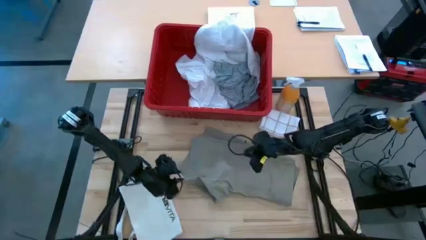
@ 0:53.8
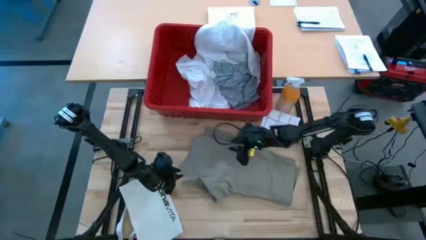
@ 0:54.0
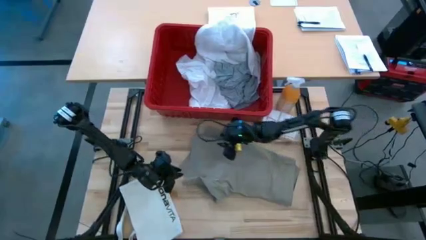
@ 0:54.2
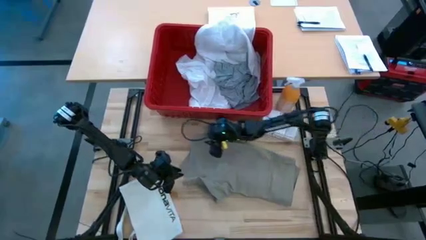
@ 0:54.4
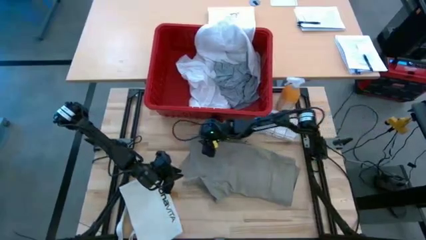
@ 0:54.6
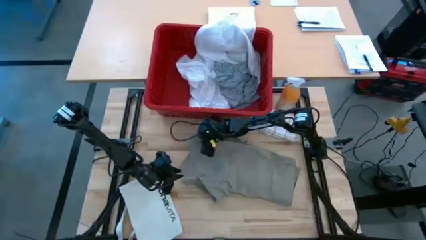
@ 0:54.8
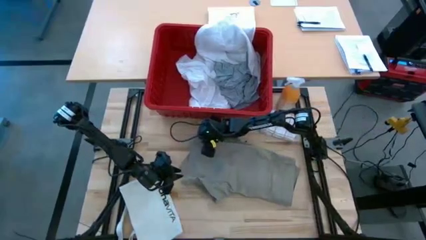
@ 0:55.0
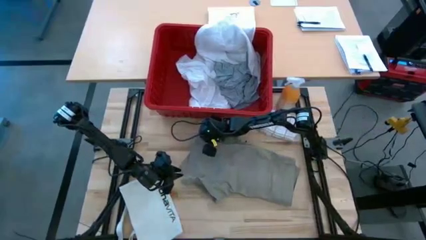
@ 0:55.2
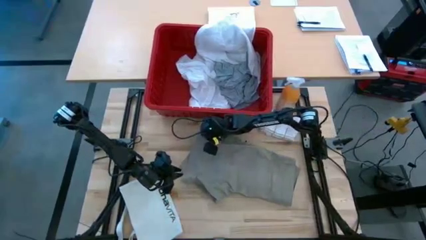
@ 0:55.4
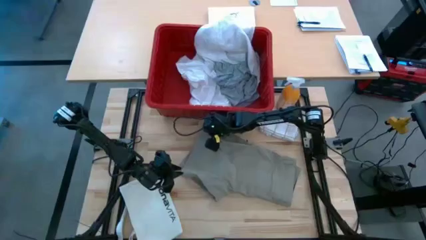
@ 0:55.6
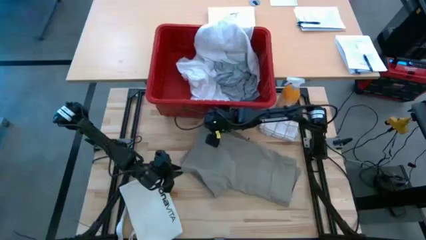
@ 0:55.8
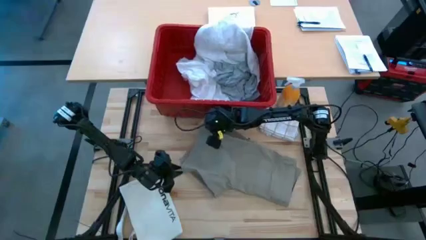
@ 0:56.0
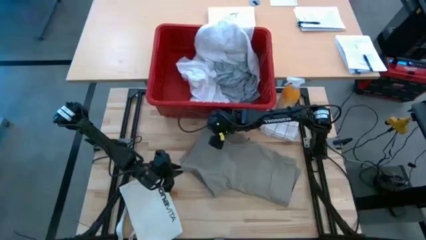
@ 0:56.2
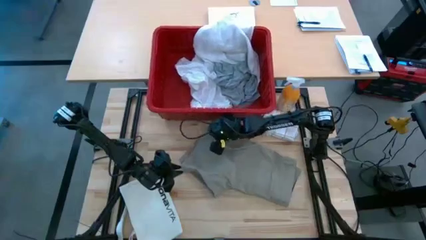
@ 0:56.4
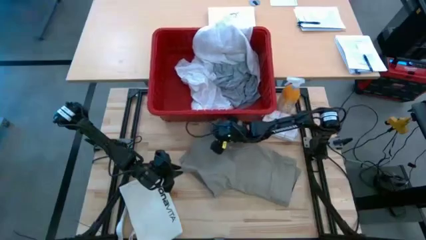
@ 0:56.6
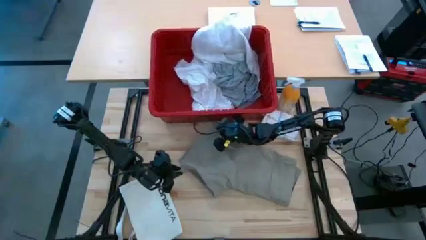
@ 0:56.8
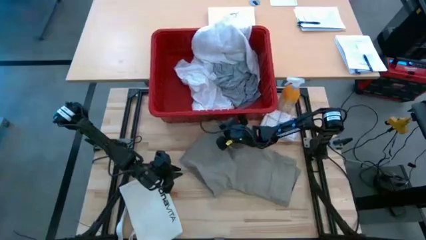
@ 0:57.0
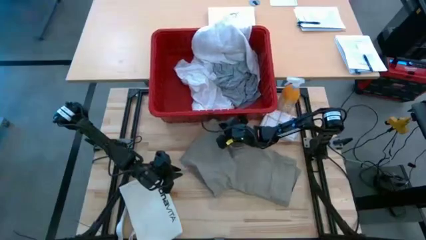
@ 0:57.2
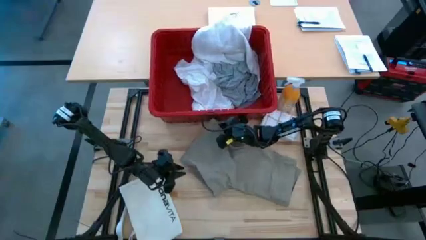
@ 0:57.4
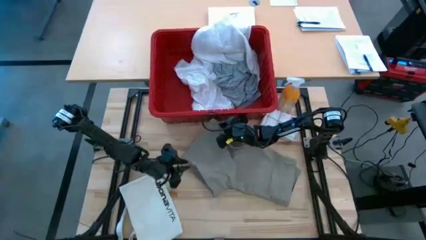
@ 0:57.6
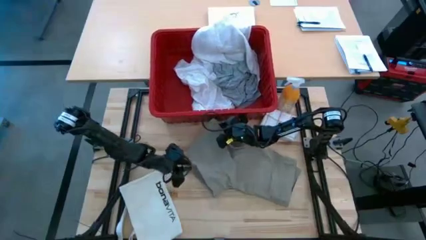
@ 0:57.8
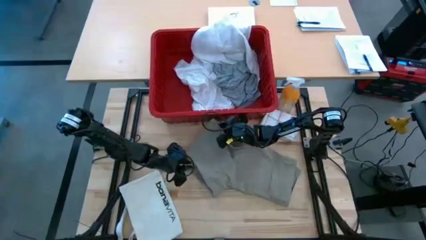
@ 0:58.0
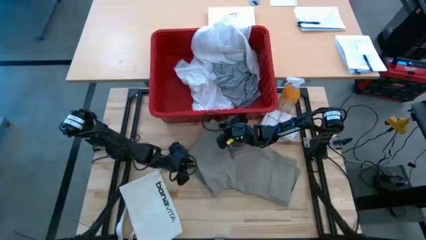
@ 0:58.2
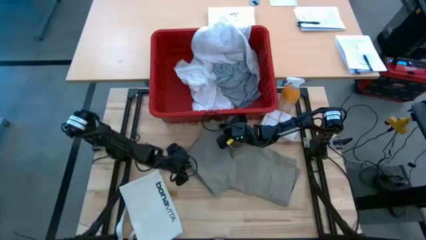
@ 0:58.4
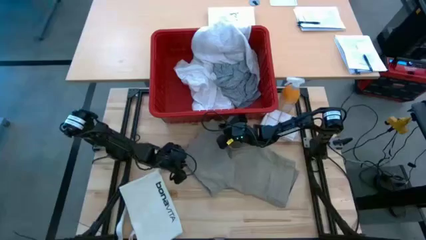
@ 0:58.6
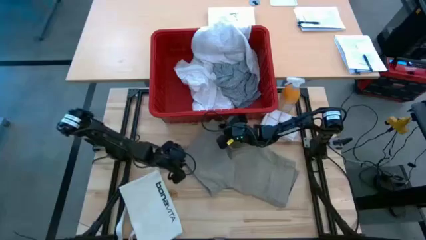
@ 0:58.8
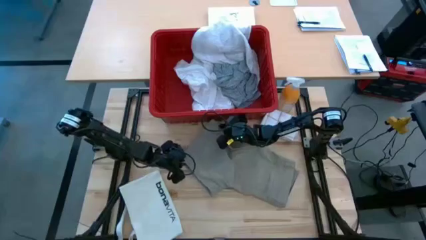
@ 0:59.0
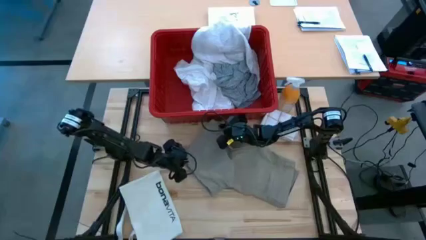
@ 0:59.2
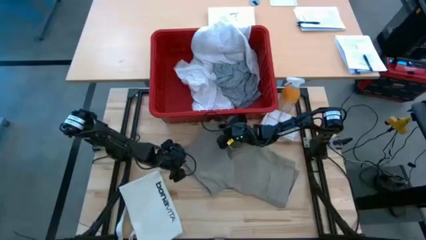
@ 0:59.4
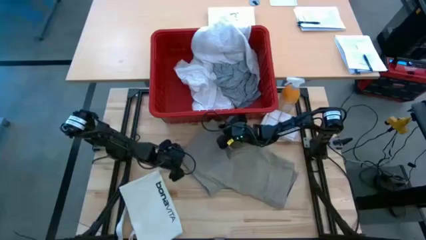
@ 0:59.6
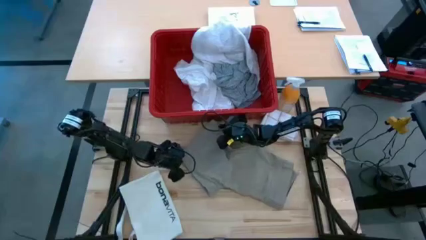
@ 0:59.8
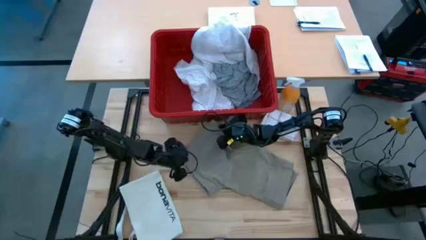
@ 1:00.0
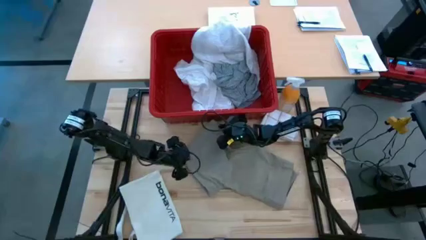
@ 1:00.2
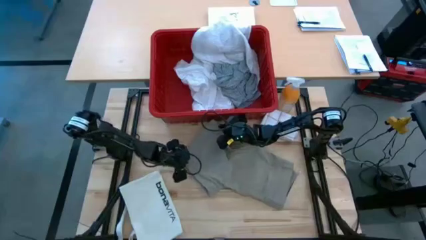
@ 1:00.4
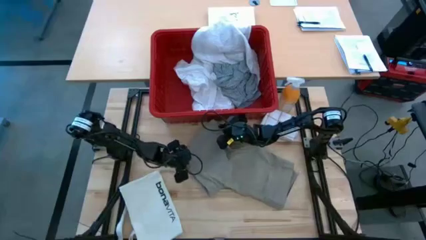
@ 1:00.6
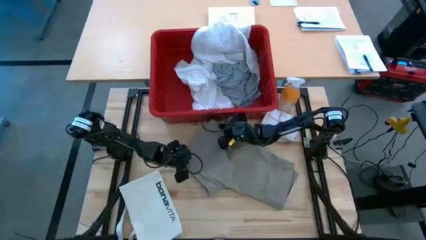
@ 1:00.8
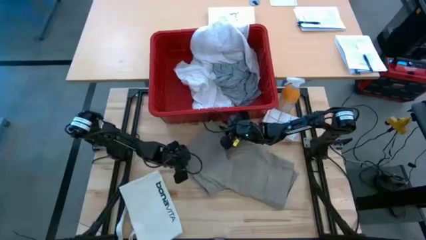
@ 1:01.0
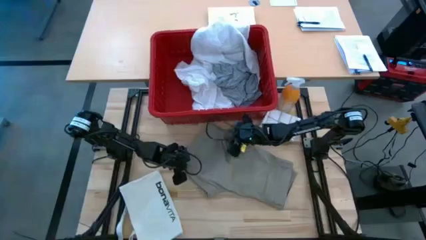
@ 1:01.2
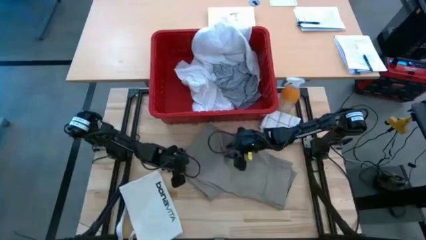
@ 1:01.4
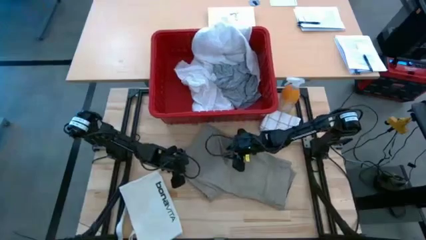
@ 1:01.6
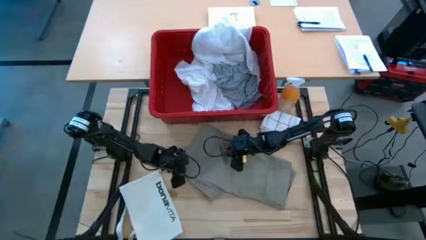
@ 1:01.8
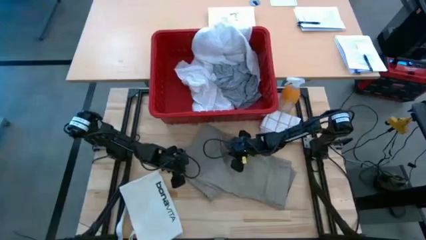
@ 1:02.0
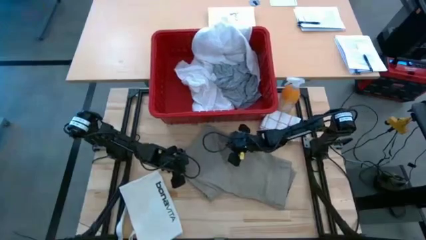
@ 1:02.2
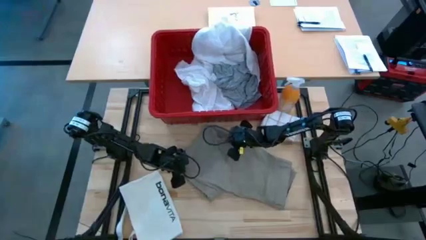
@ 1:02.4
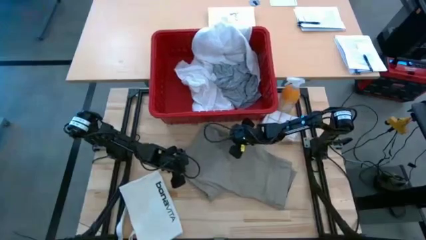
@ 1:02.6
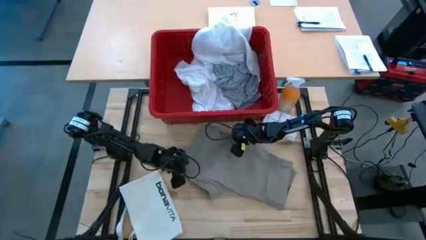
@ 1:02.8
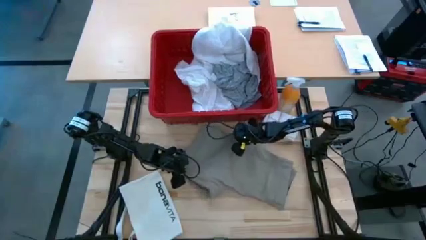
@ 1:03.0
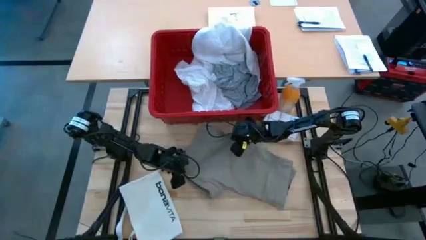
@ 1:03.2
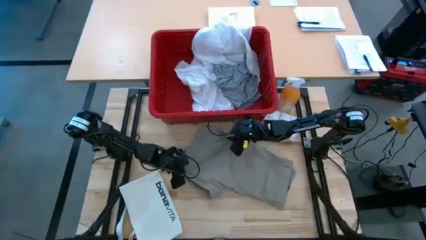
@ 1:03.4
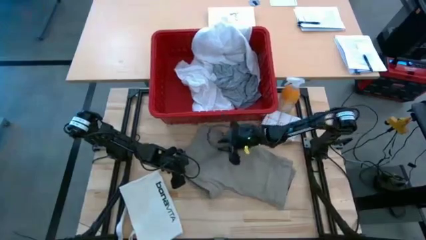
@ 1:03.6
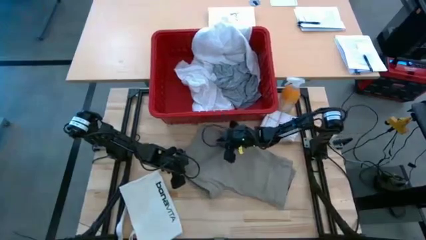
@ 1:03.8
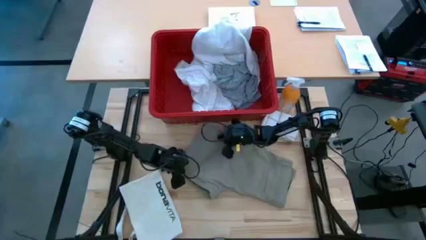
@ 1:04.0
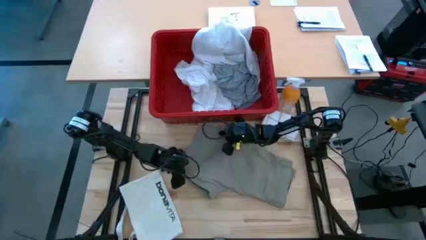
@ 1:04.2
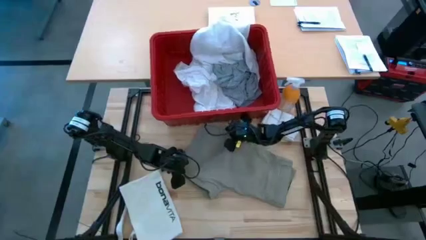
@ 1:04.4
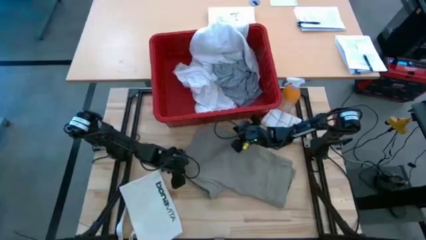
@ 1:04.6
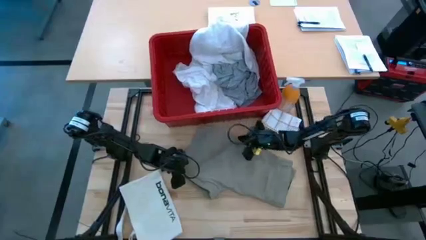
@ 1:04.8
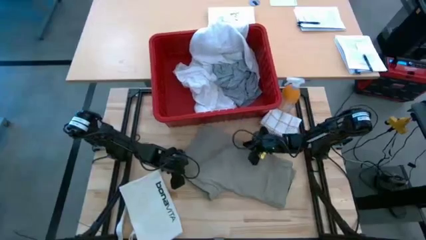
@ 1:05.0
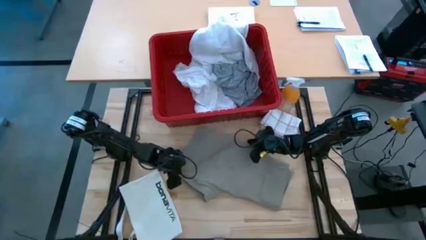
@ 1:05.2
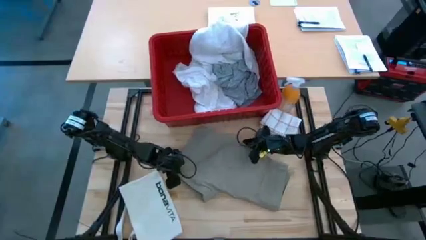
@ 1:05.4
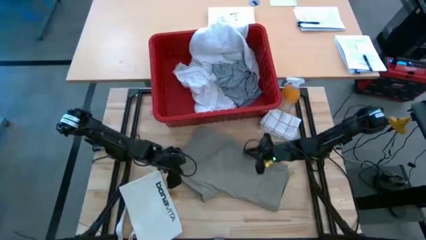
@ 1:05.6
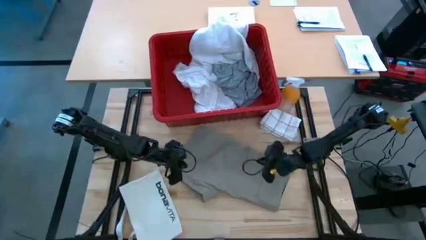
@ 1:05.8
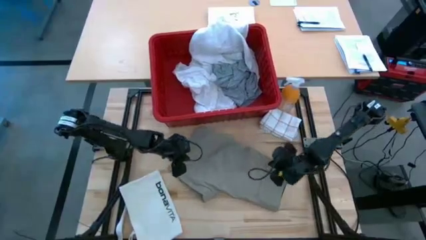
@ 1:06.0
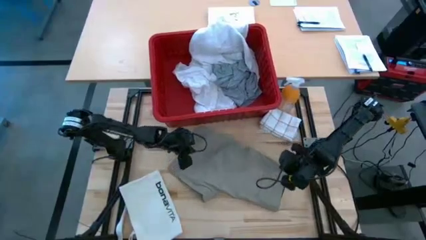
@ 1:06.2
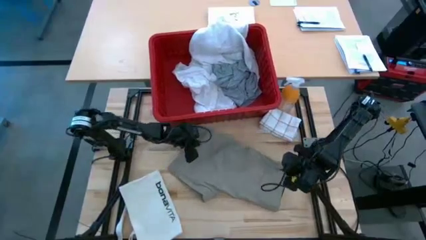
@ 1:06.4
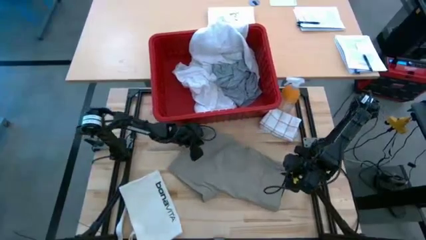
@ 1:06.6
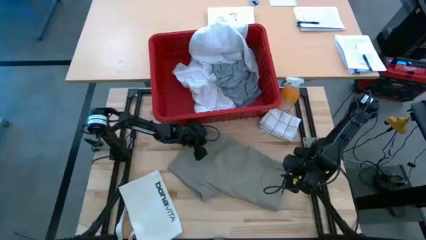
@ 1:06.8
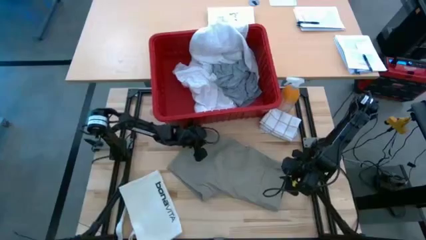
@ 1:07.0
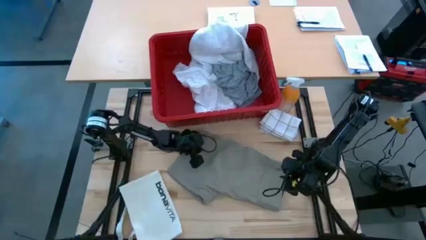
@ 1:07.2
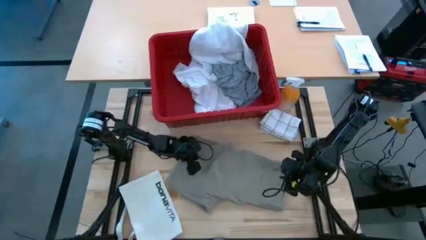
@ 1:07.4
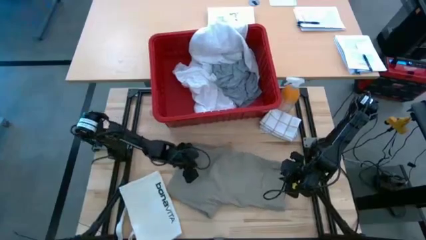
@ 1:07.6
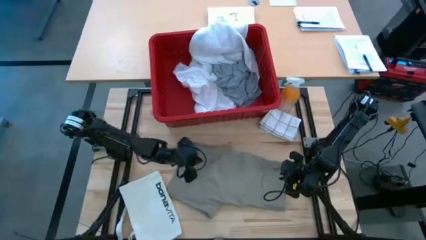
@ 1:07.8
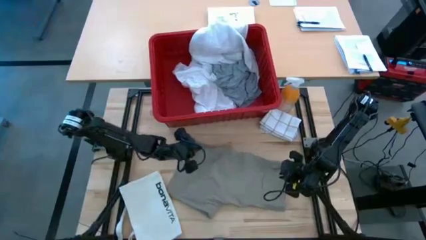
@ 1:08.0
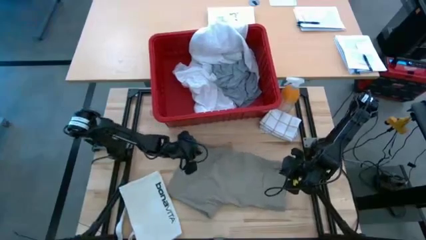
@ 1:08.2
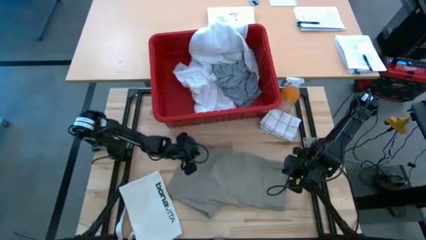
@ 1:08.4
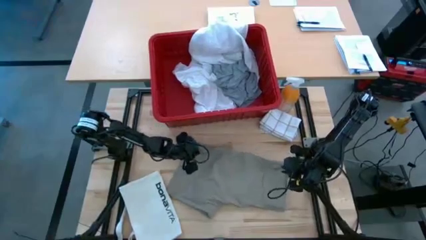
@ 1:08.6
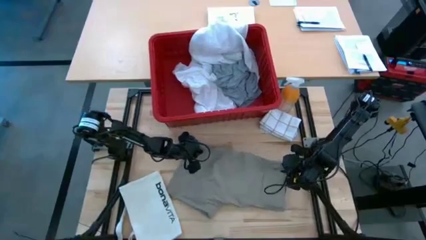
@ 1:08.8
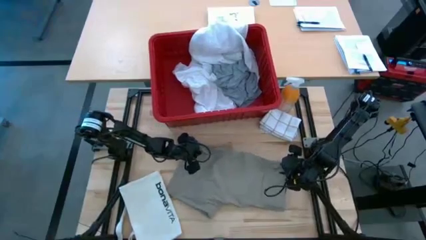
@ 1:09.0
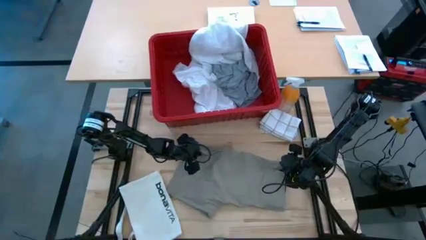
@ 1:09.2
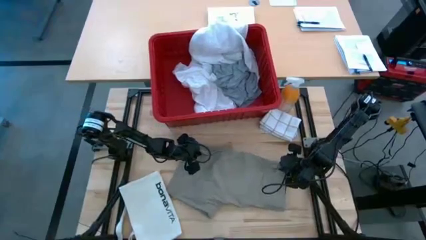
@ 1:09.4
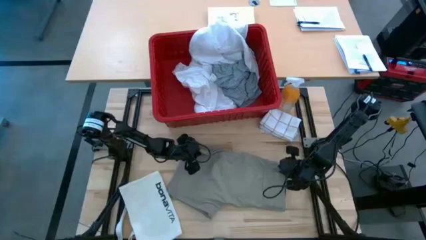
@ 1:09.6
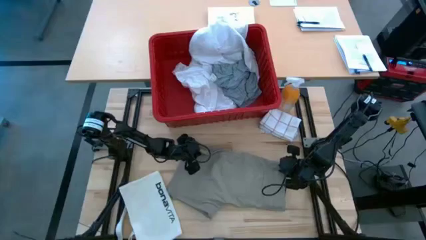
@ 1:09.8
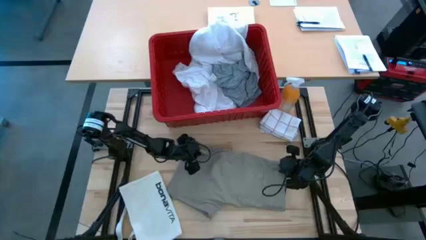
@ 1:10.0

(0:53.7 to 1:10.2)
Task: Fold laundry
Fold the brown shorts
